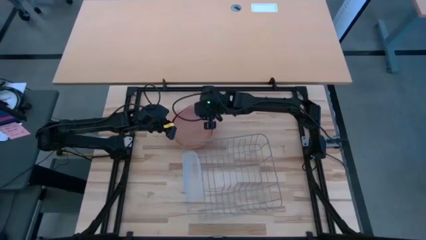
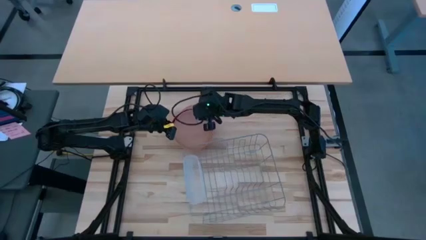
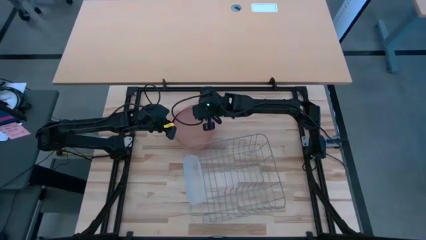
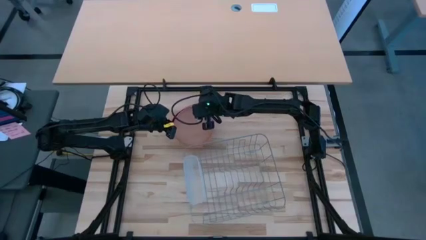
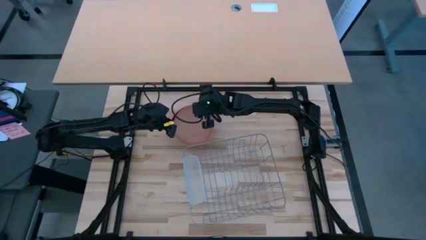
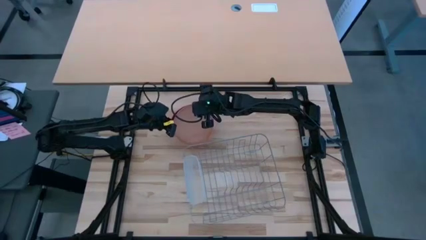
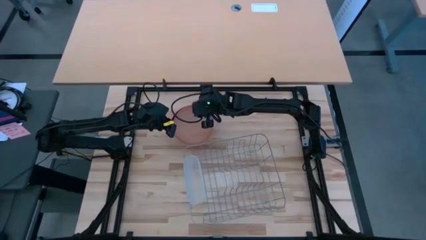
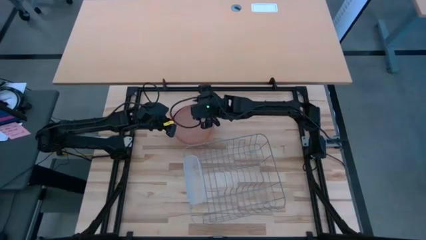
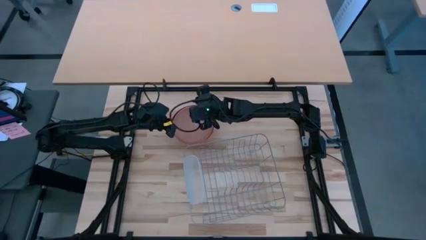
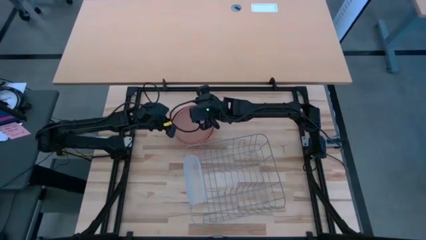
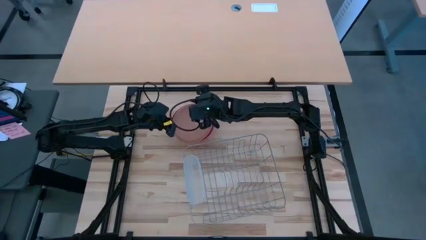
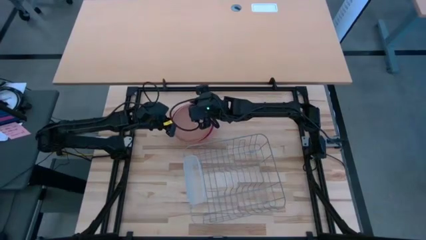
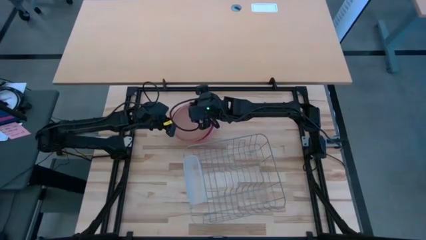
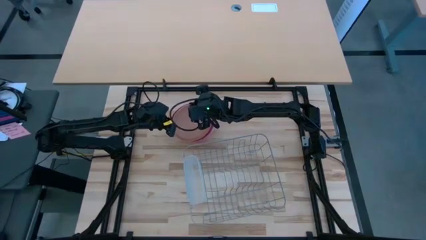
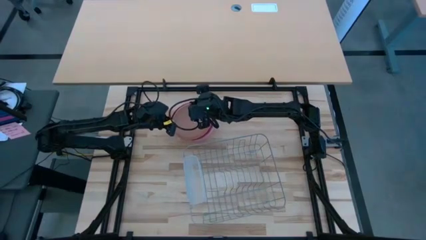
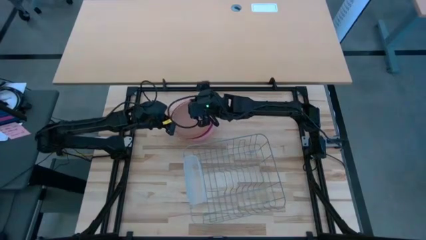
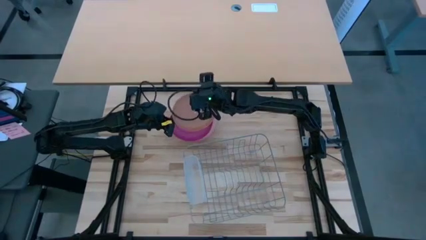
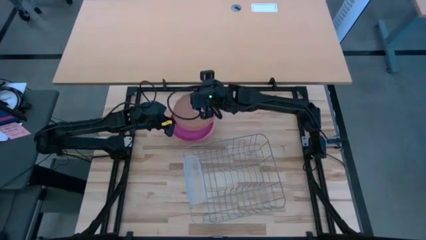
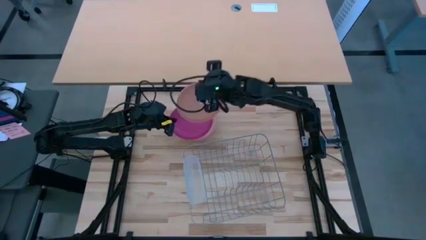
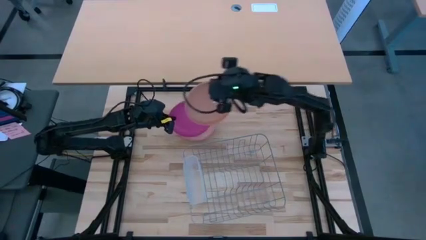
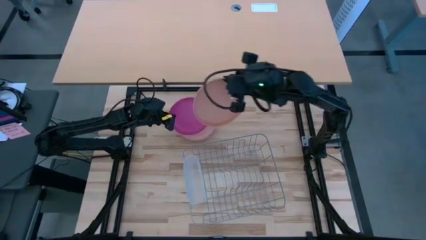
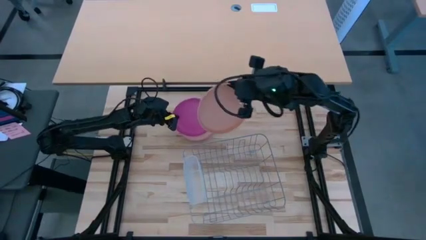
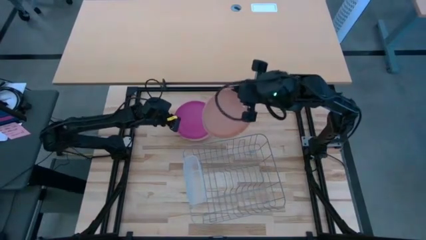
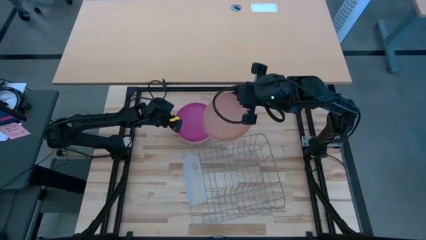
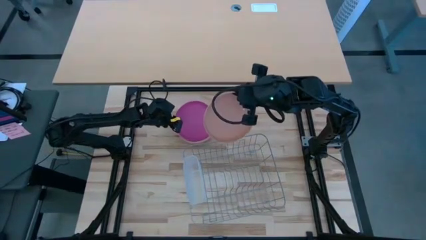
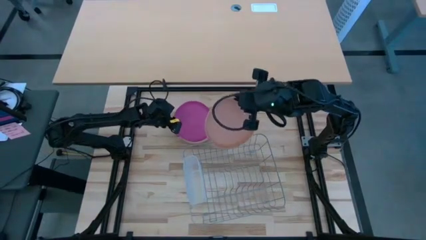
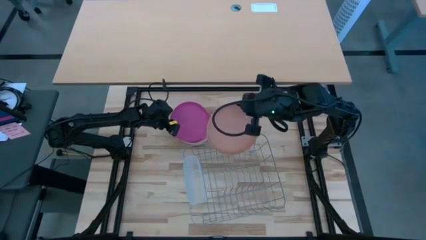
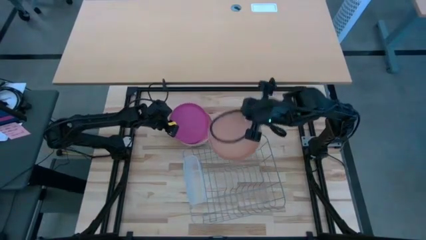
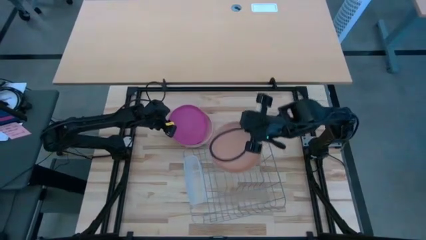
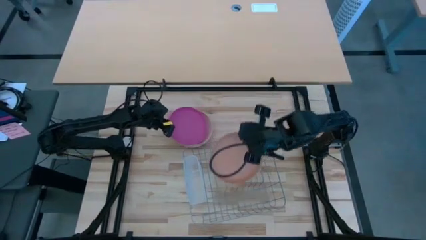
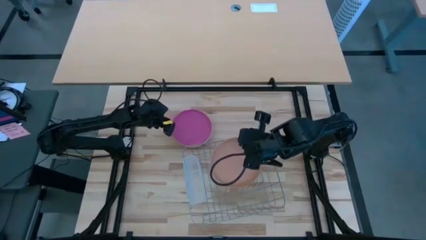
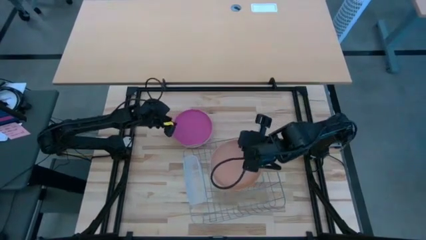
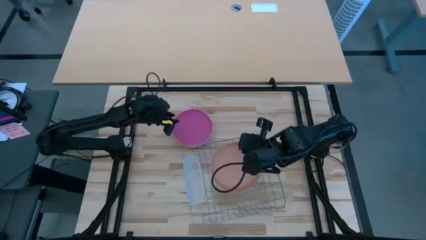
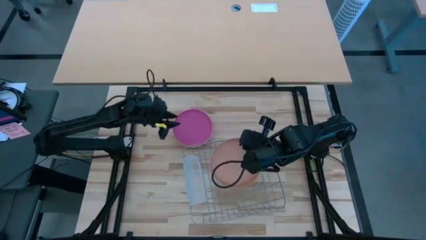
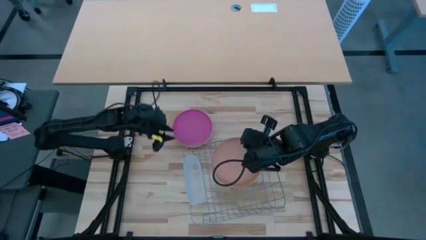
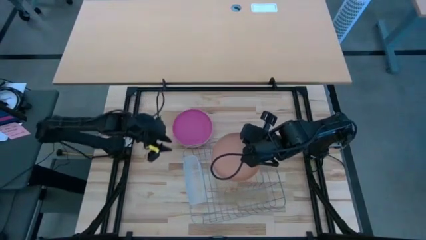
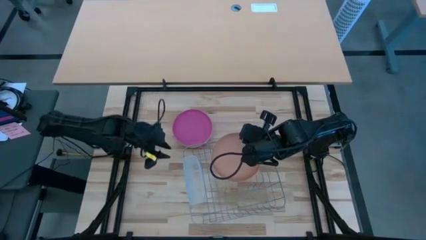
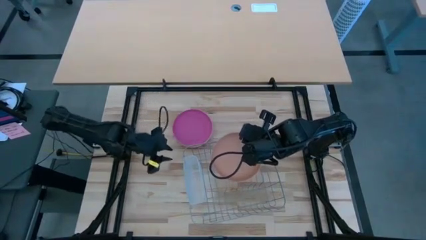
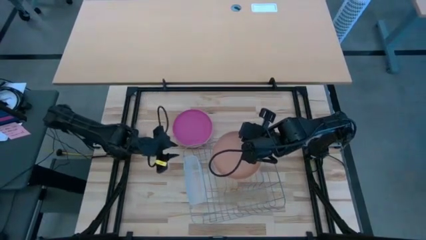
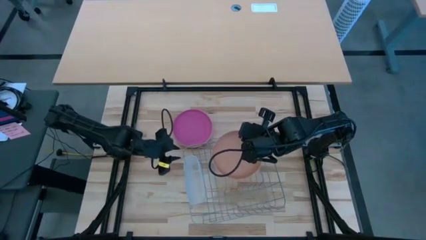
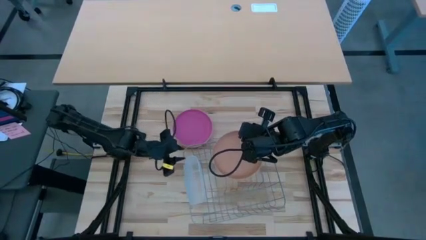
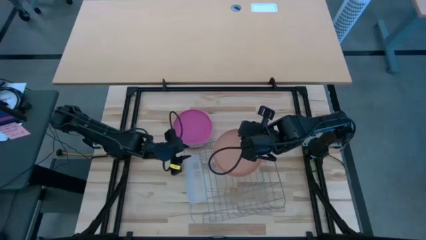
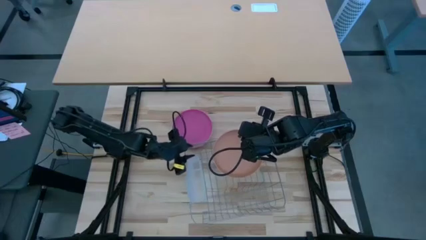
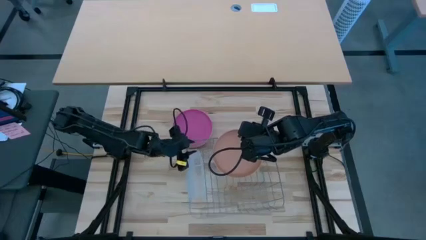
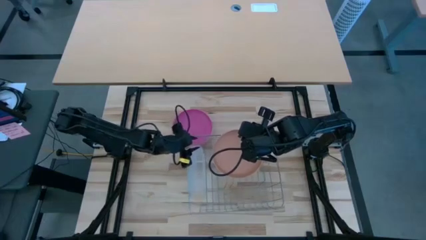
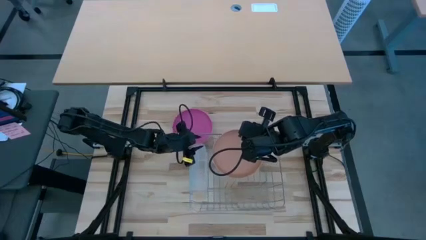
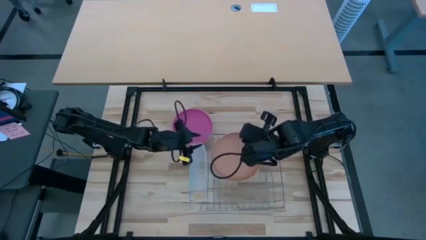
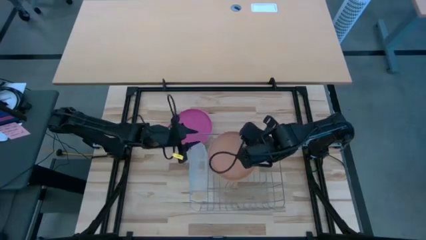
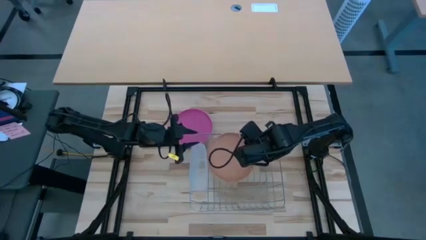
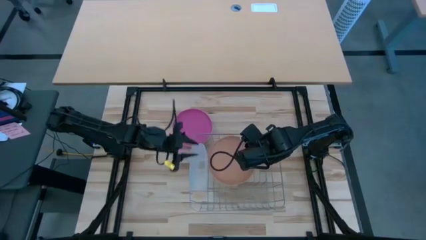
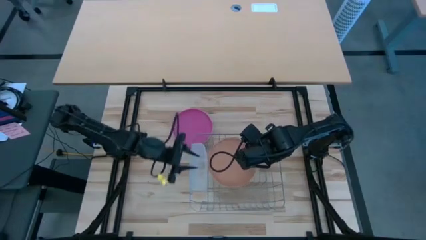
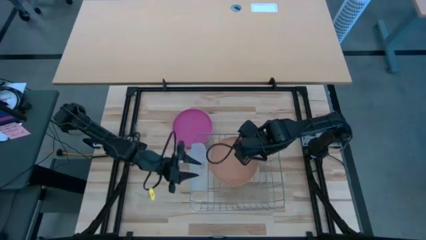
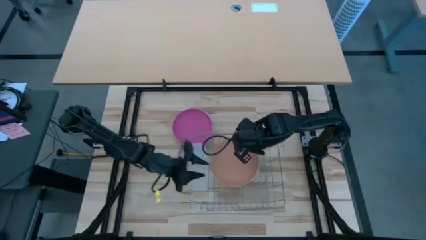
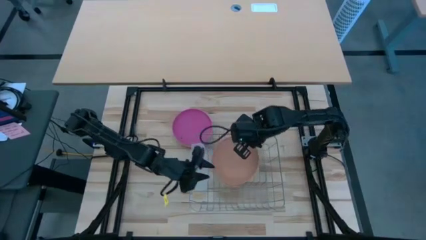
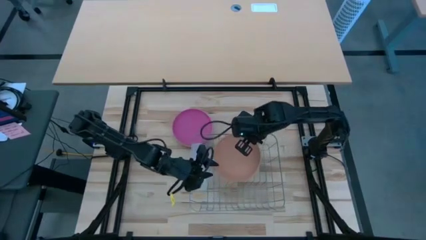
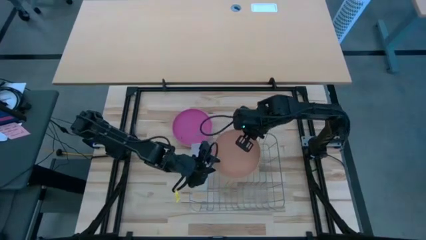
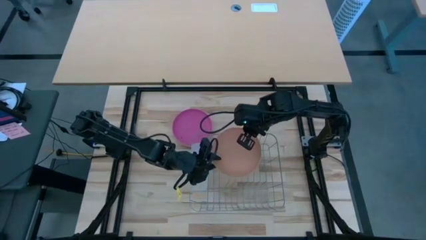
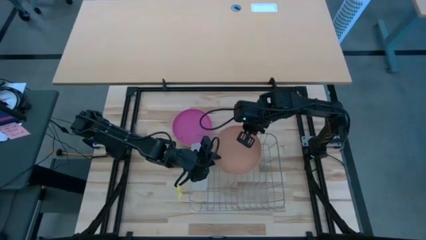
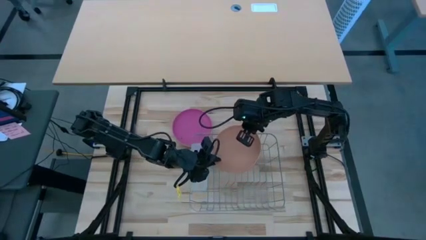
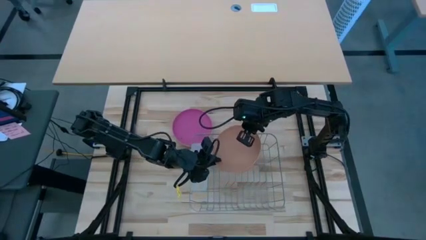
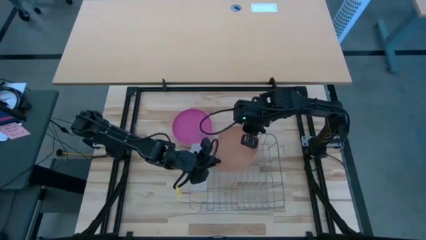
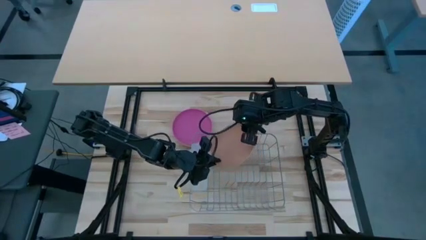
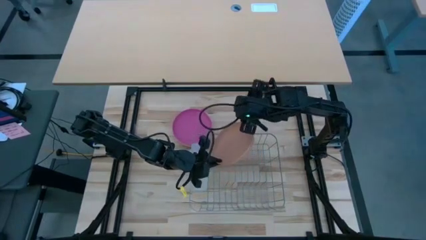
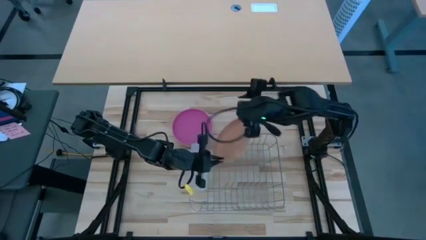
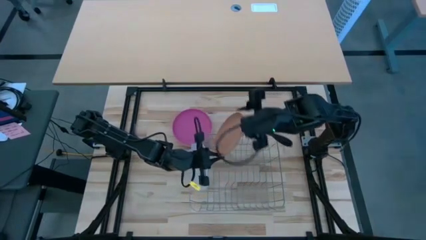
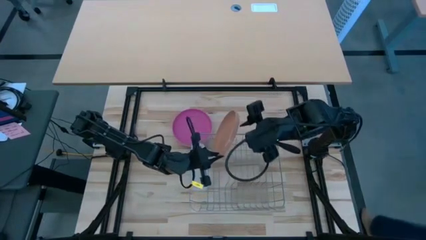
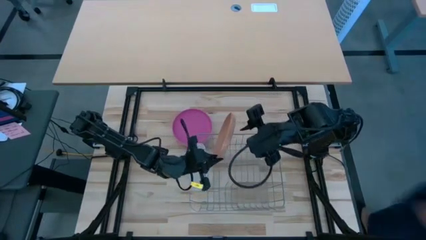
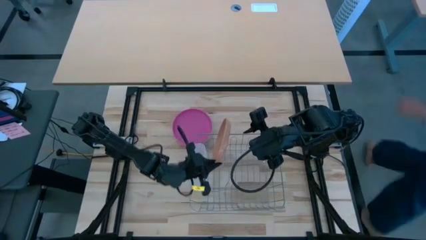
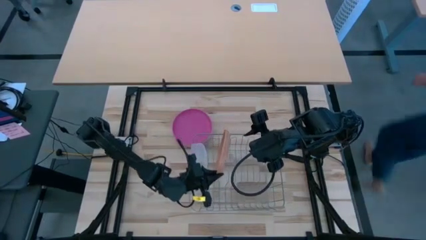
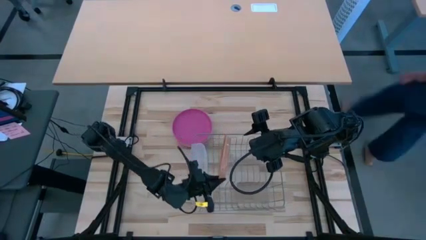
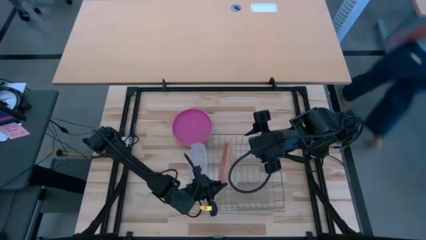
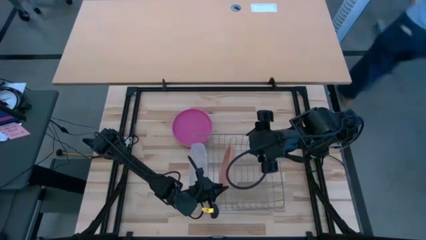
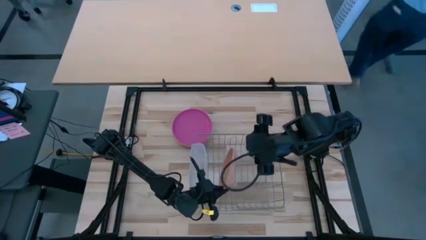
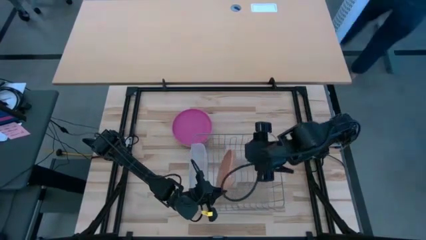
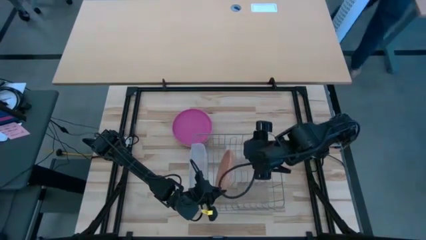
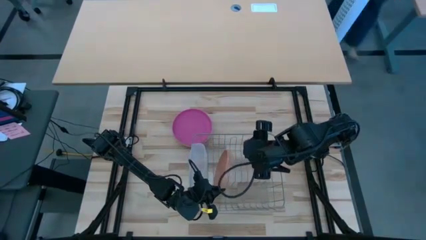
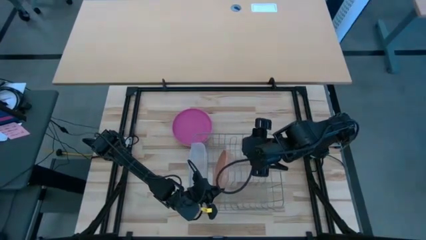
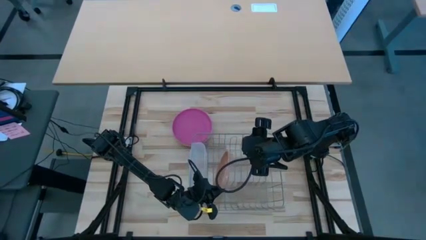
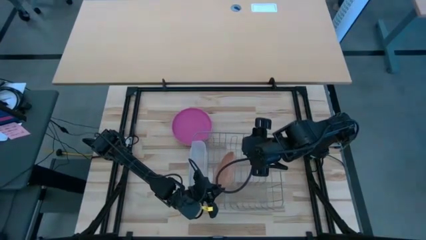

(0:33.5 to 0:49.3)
Task: Sort dishes
Put the light brown plate in the dish rack

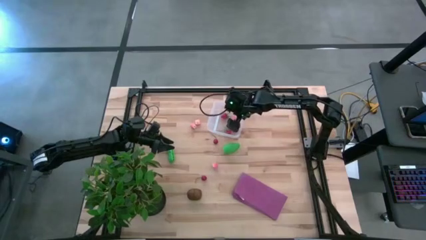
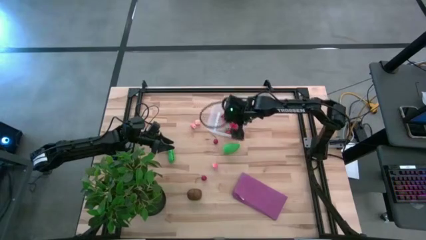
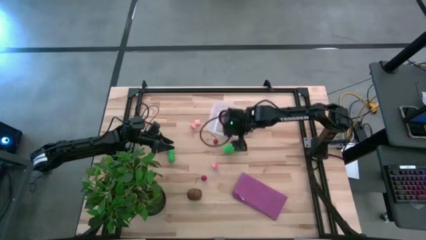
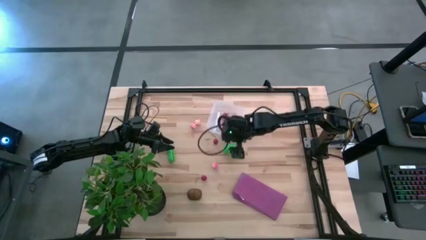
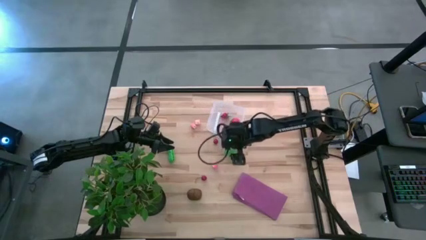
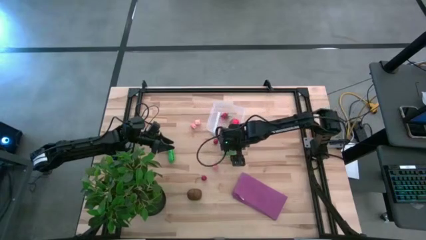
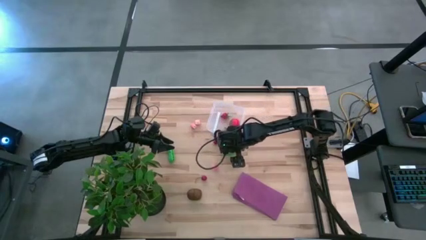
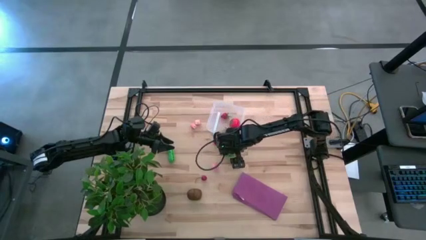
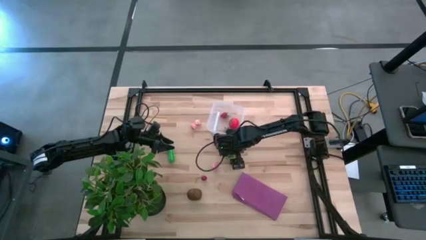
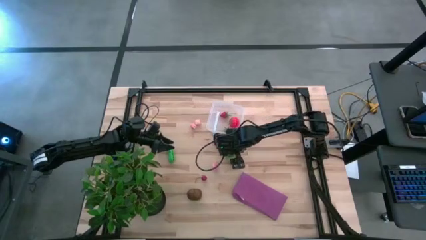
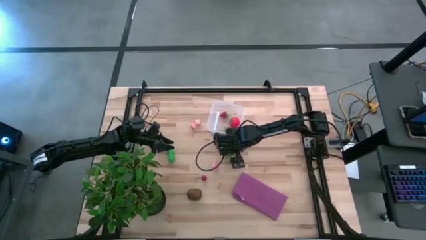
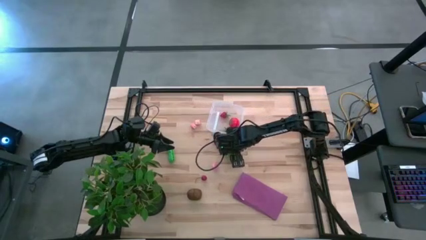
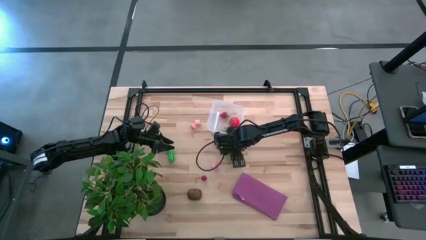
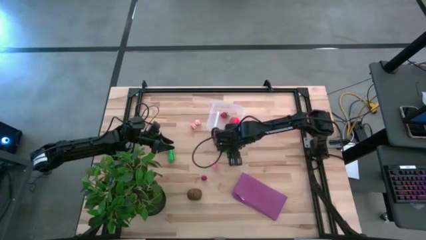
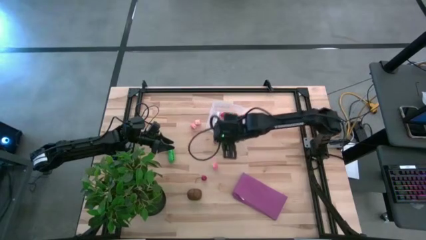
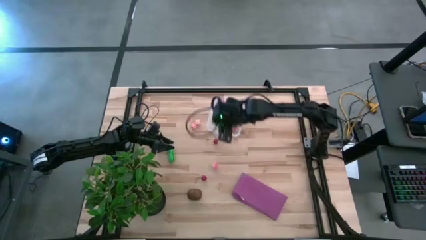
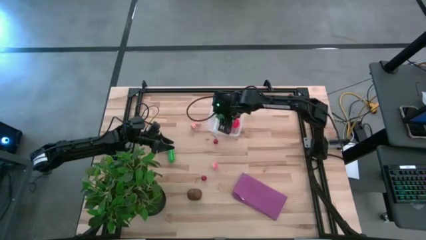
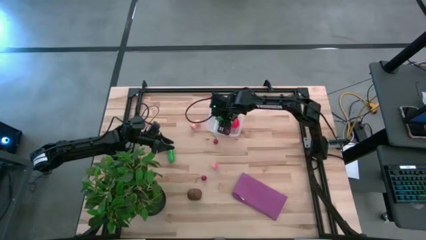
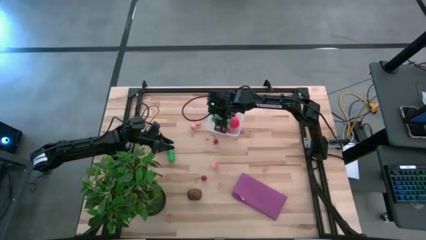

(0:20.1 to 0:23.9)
Task: Pick and placing Produce into tupperware
Put the corn in the transparent bin
